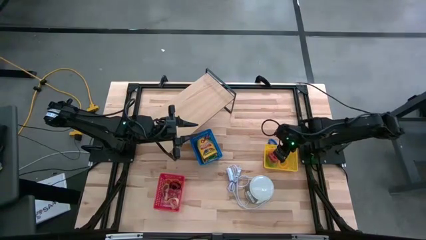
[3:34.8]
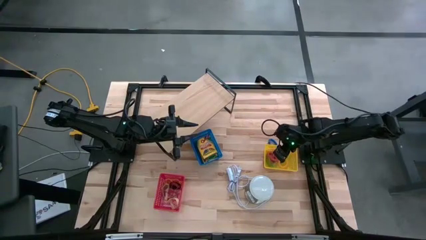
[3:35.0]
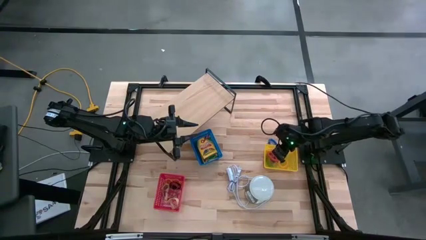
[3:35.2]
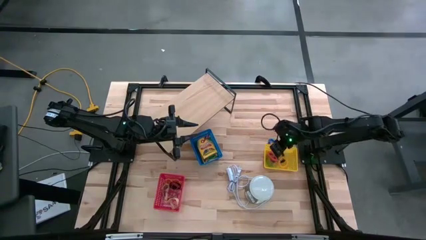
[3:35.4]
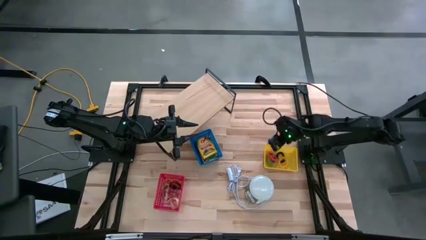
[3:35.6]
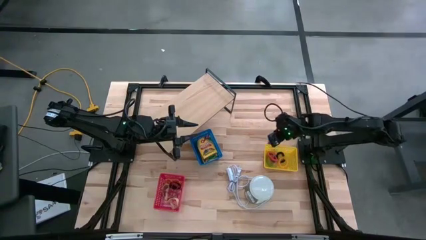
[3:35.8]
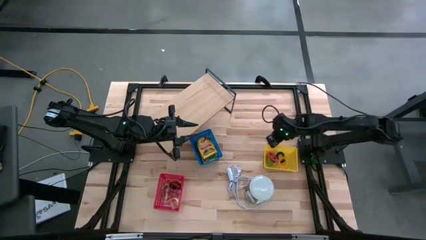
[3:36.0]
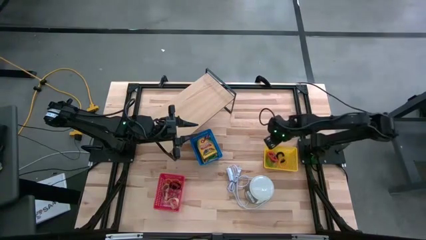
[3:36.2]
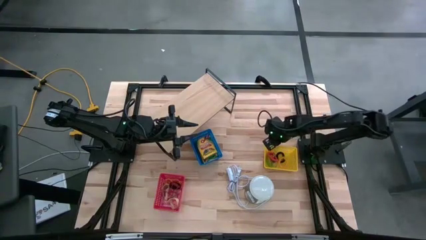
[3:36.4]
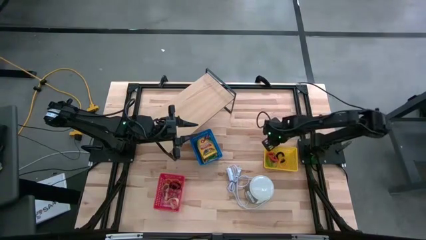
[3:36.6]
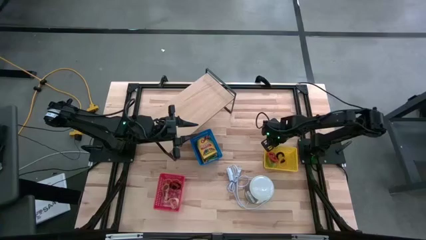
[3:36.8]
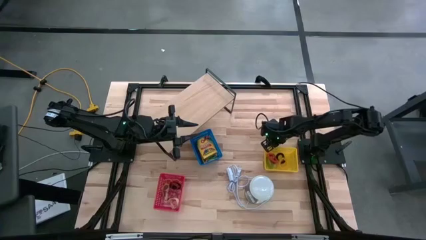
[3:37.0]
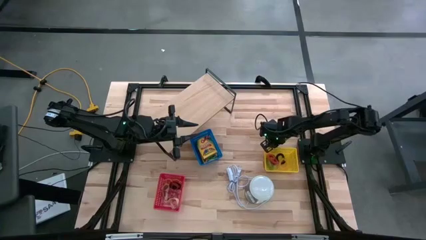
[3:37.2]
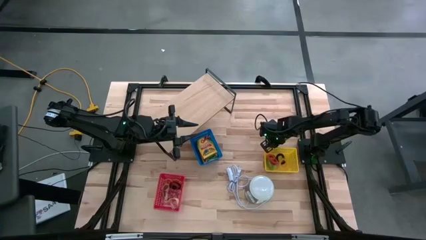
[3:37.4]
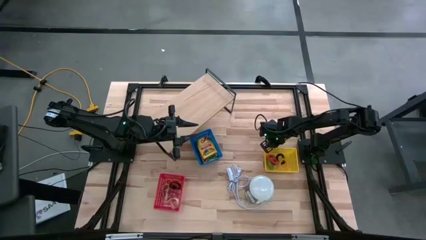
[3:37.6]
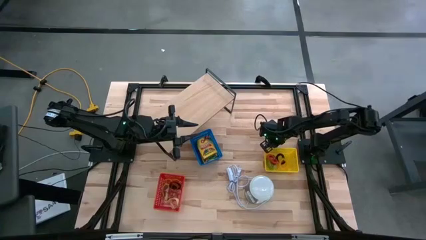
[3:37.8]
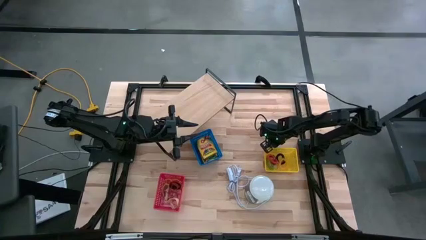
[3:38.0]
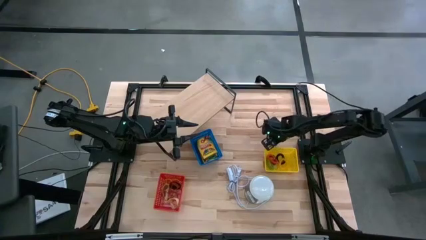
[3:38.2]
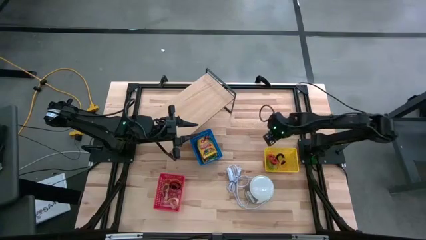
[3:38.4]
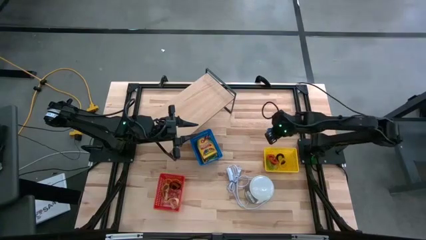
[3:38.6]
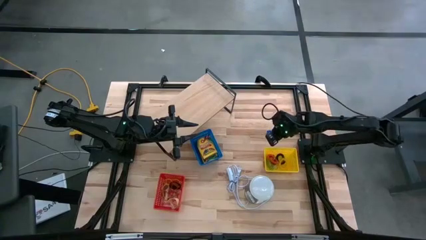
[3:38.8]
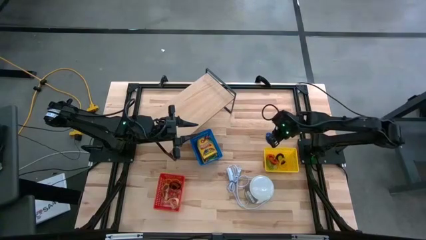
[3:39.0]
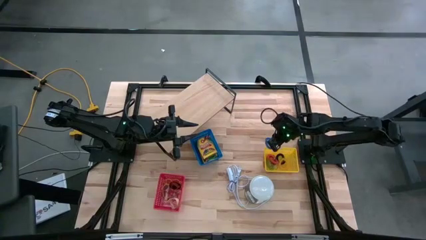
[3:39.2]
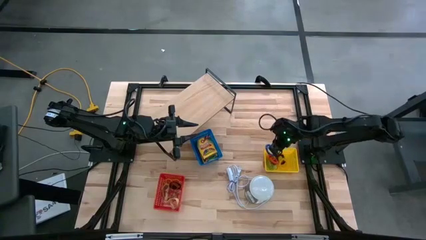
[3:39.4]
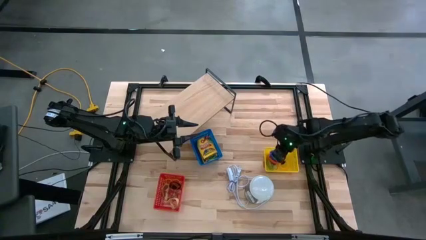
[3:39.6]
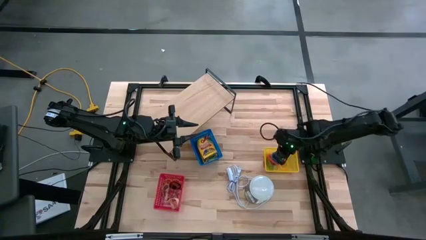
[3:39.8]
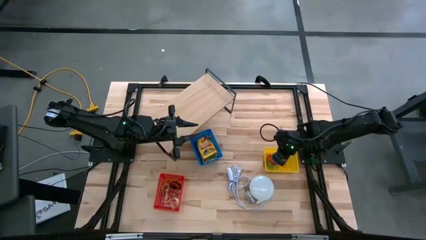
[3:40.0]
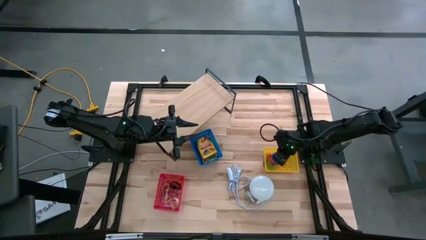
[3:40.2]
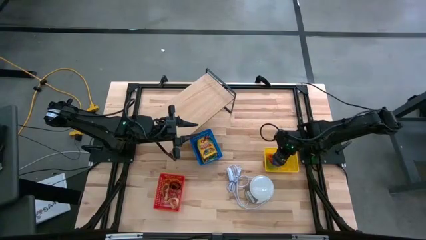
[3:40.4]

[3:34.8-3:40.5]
Task: Pick & Place Office Desk Supplies
Put the blue spring keychain into the yellow bin

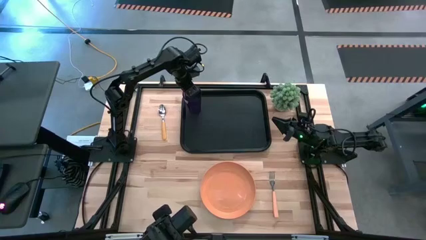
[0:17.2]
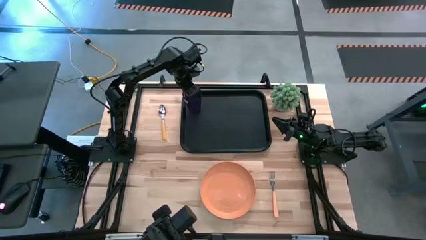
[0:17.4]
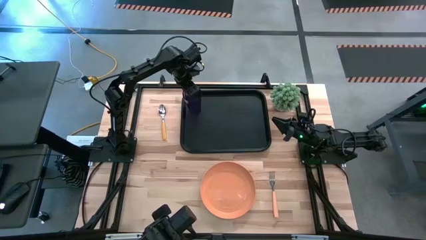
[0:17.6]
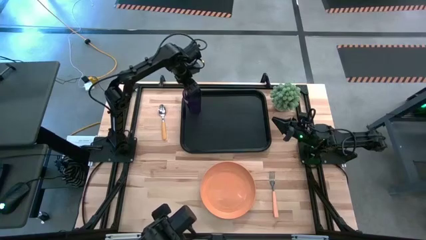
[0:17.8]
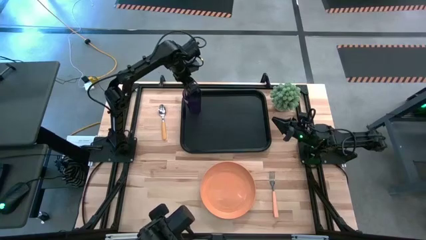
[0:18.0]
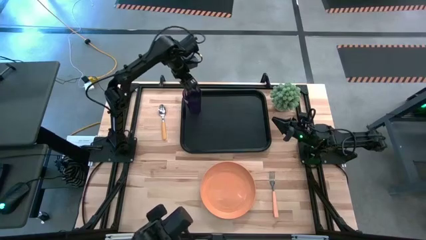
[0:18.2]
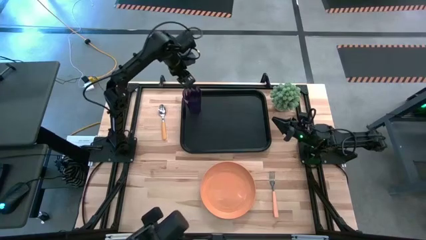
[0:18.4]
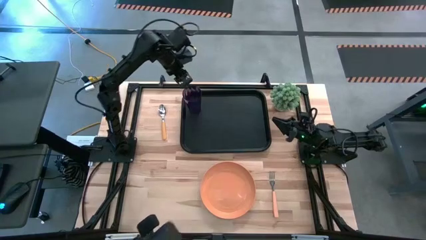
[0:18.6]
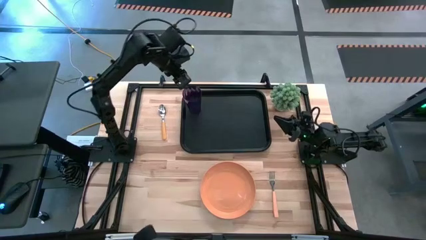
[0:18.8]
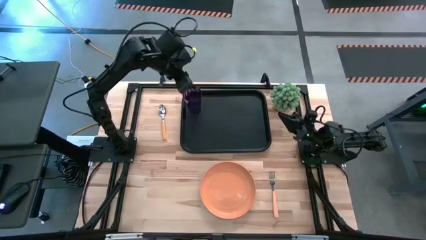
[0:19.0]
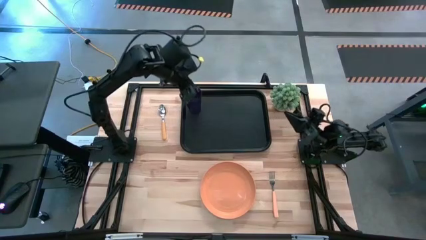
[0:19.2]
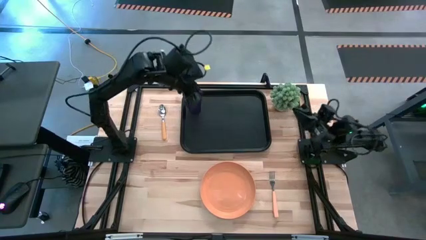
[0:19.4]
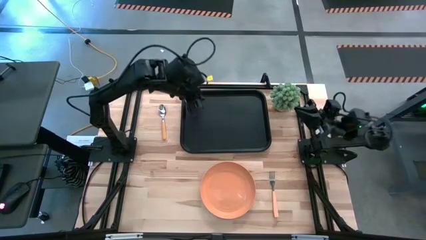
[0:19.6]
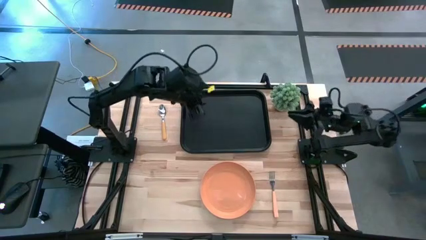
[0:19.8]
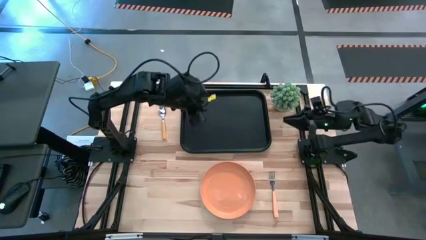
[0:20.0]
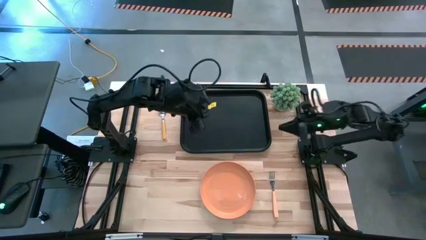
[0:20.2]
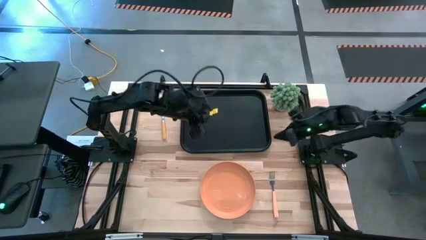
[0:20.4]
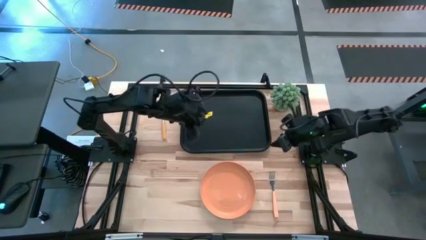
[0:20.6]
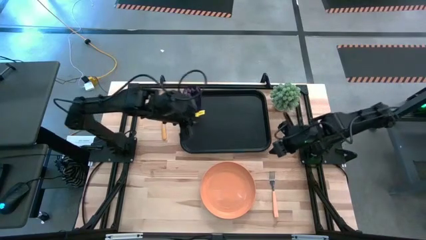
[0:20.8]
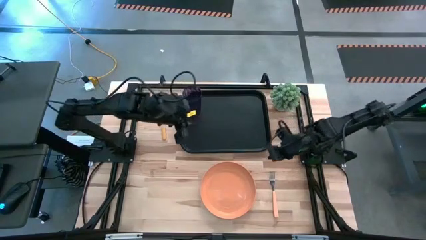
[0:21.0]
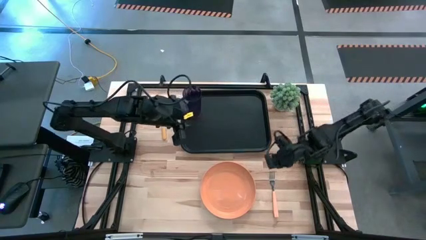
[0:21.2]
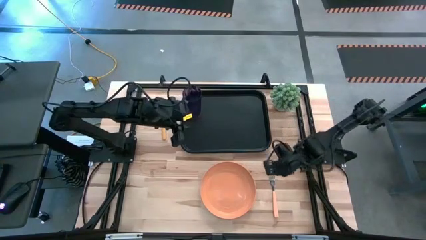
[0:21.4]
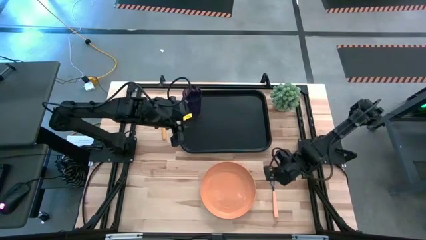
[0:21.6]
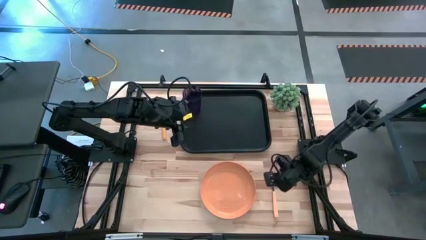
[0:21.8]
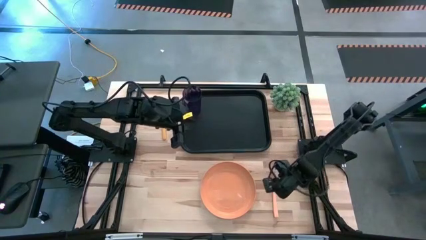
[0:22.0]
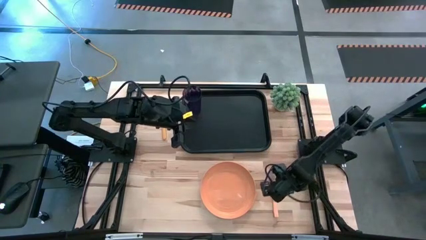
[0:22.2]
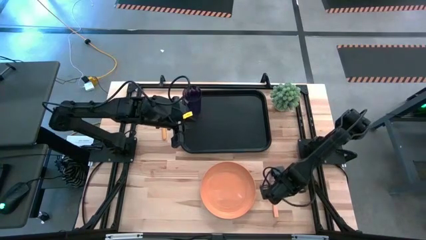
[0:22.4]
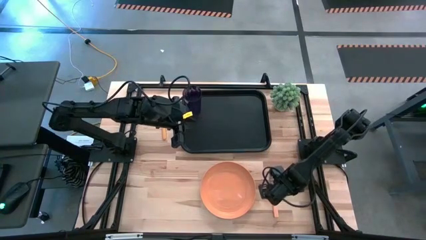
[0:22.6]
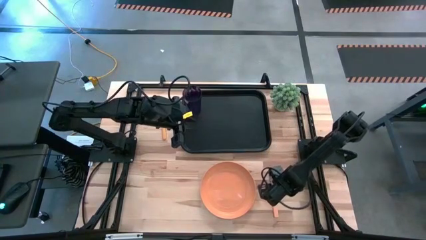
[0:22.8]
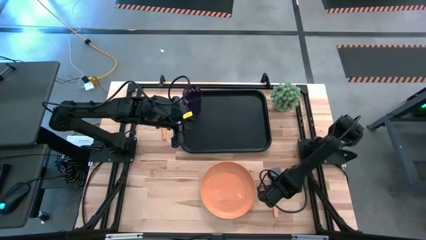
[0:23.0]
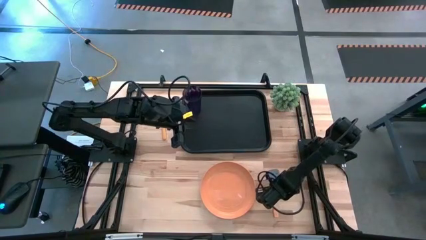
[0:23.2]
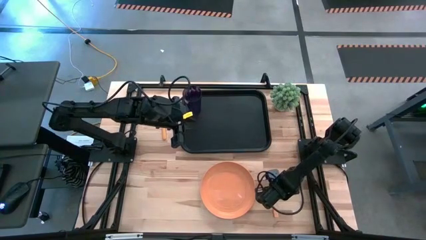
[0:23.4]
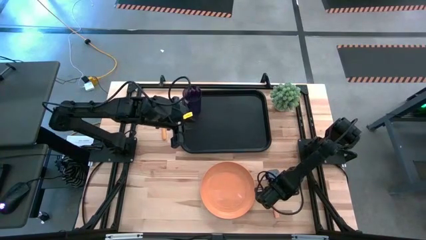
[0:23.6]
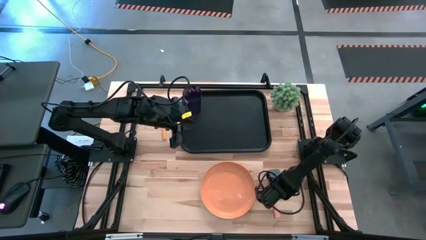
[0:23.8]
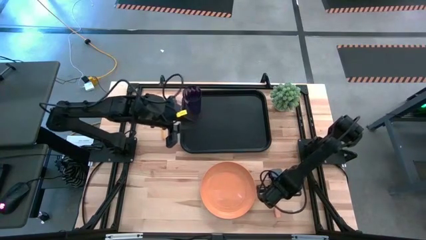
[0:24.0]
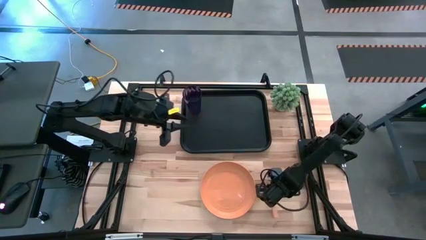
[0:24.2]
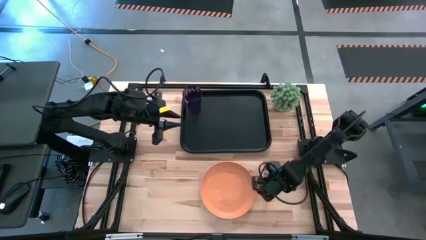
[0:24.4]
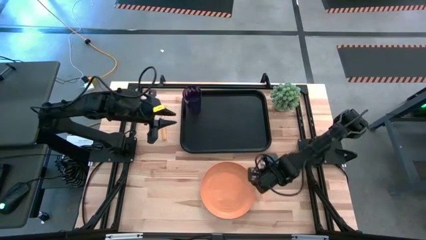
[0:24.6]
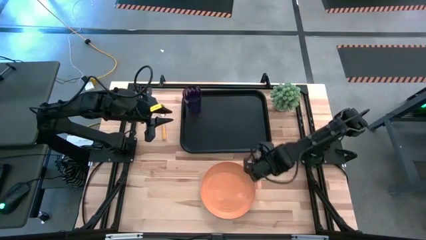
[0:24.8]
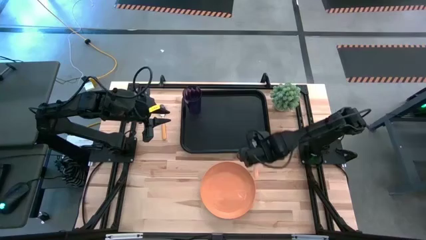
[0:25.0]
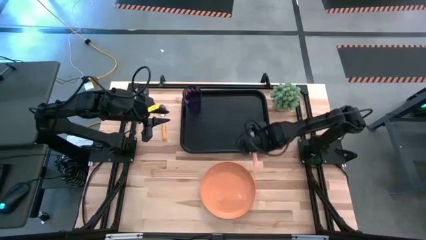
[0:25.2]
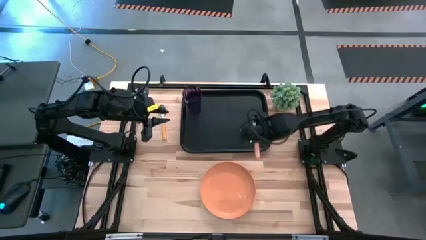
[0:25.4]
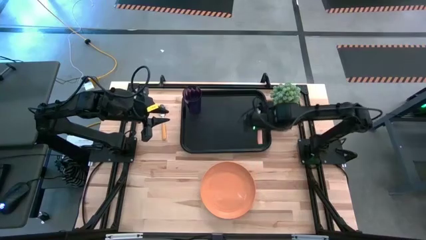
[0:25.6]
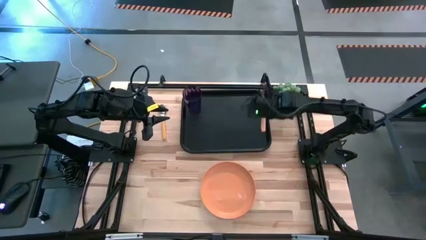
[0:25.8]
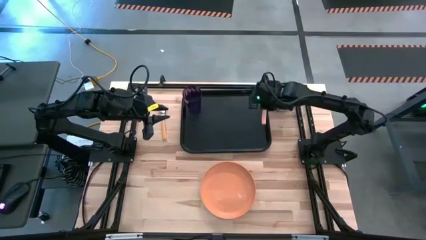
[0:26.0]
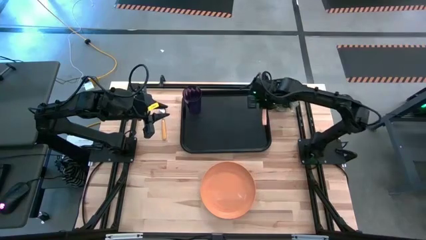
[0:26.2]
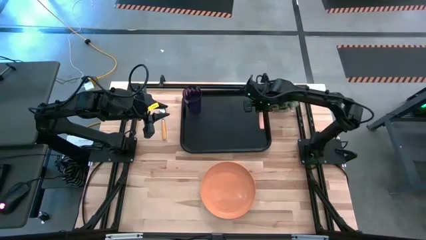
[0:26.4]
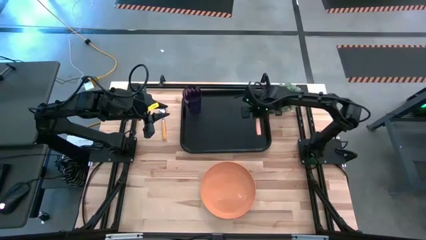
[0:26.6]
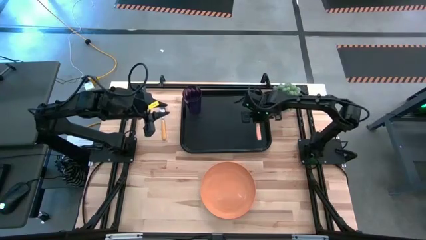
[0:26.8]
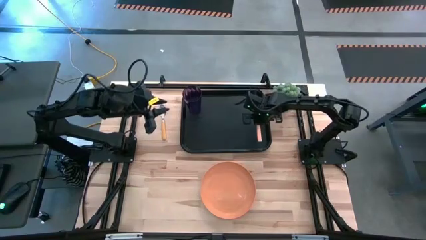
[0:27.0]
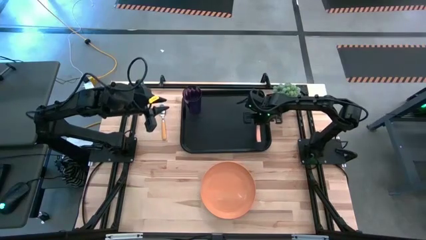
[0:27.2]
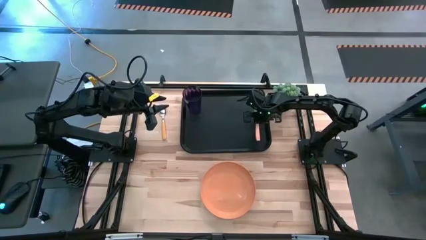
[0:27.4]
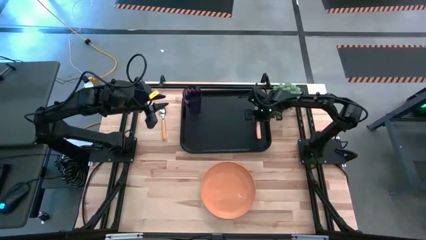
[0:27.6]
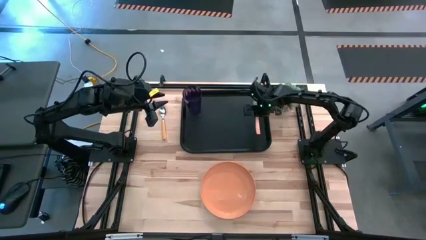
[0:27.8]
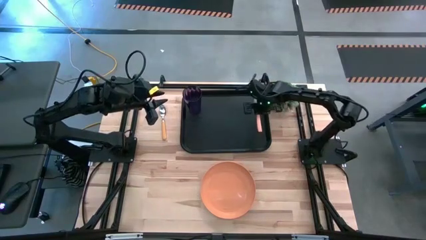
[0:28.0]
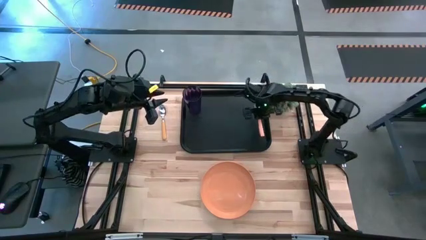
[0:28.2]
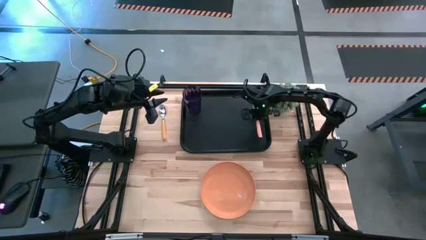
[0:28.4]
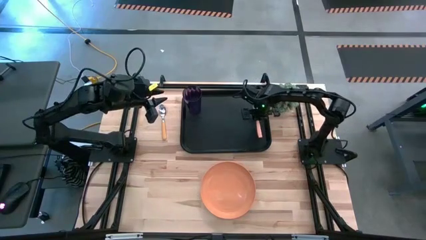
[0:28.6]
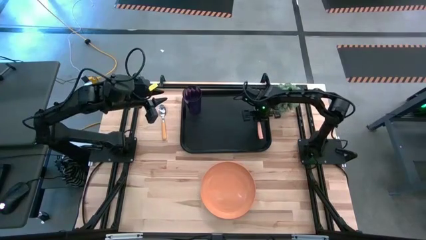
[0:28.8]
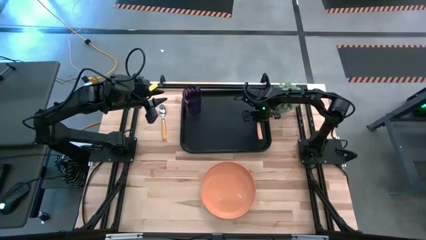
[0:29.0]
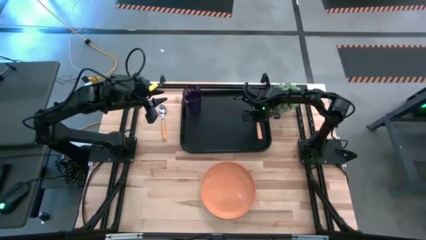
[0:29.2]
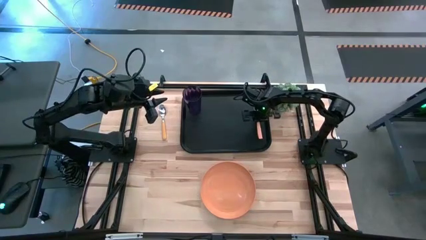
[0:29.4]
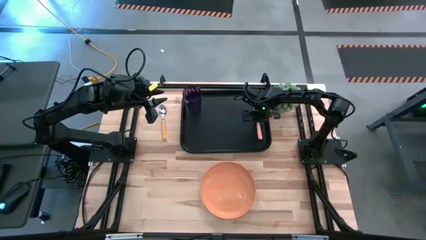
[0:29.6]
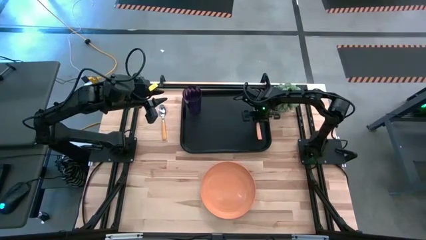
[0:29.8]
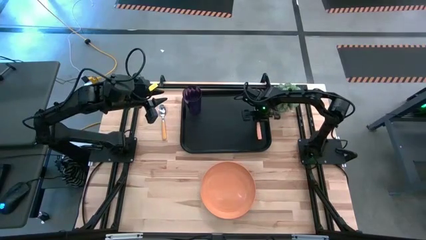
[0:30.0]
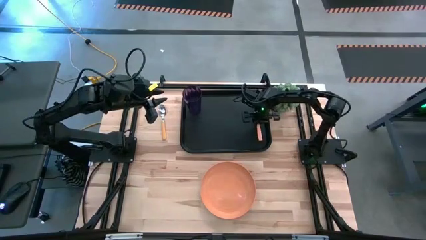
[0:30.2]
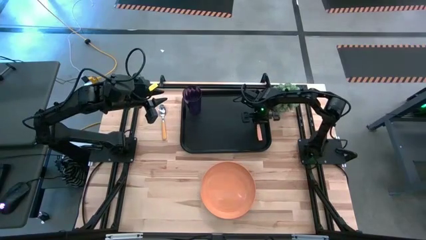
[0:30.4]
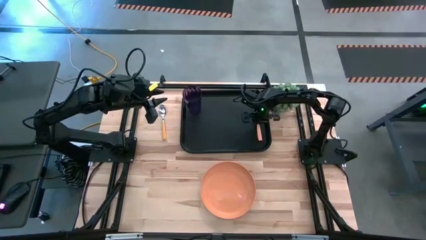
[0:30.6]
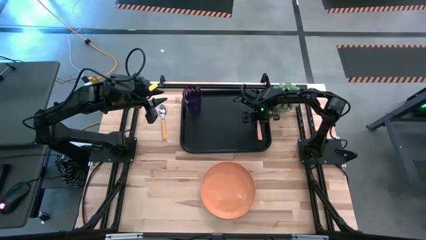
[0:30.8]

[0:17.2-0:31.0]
Task: Pick and place plate/cup/fork/spoon on tray
Put the orange fork to the right of the black serving tray
